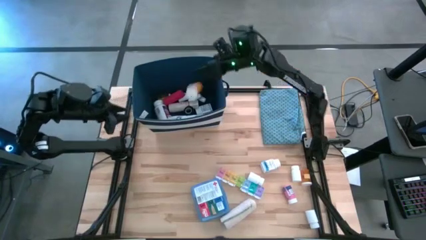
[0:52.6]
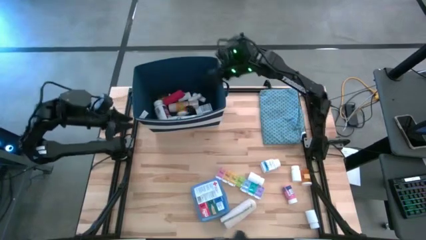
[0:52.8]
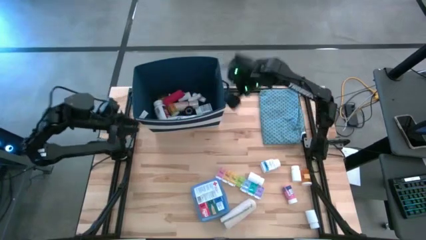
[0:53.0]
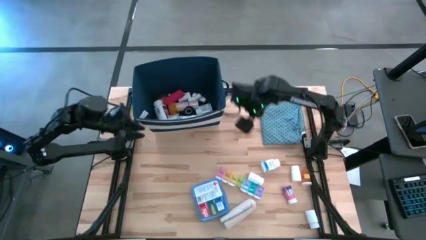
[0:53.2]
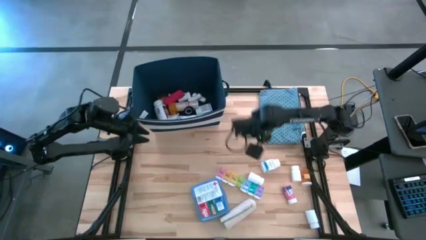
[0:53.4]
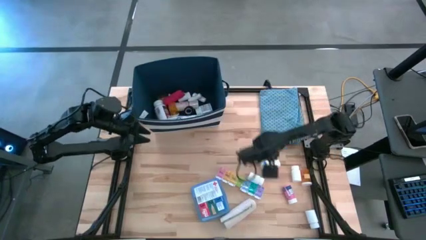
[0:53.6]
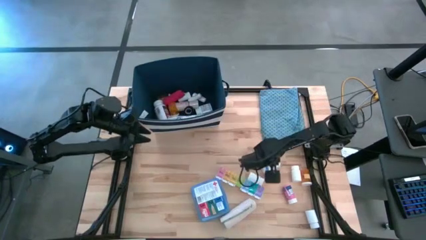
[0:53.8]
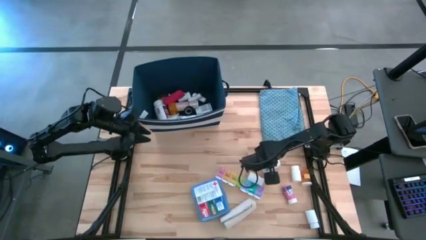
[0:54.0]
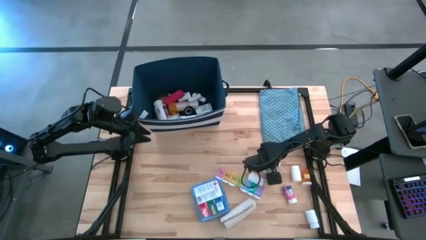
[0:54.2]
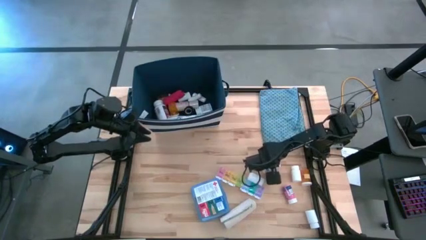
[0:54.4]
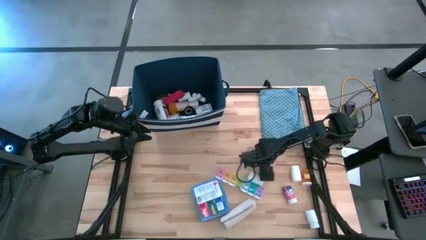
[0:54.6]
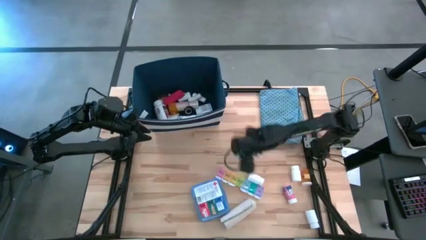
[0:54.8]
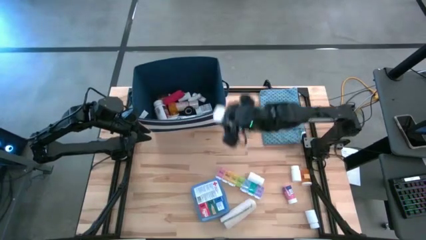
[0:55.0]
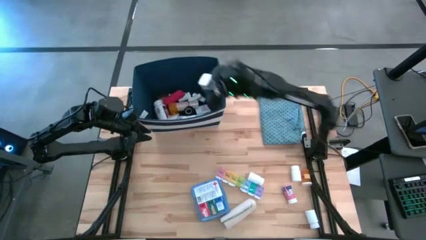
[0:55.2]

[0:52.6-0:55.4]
Task: Pick & place medical supplies in basket/bin
Put the blue supplement bottle into the blue bin

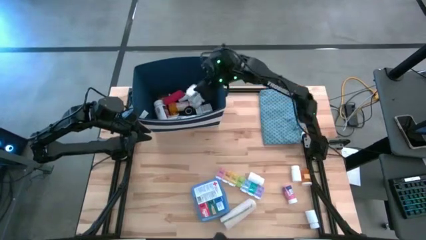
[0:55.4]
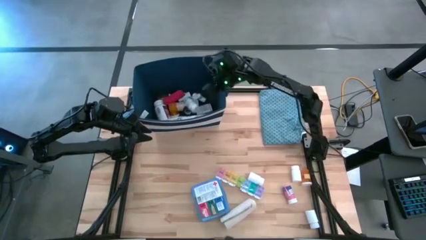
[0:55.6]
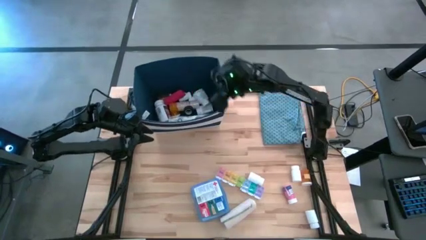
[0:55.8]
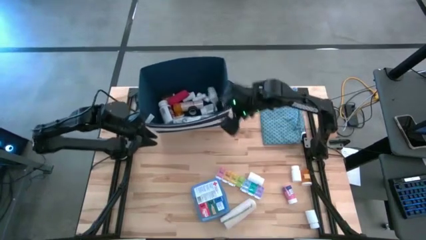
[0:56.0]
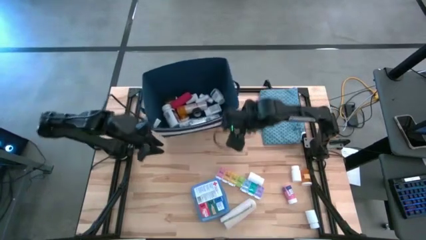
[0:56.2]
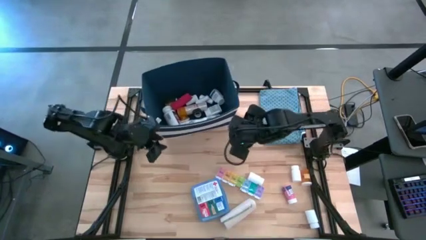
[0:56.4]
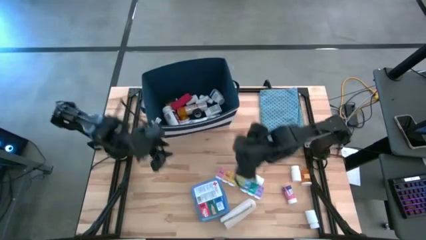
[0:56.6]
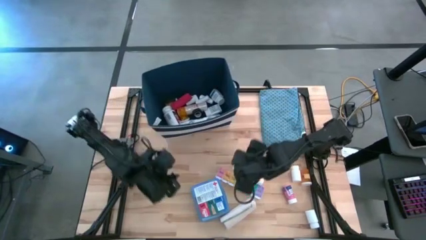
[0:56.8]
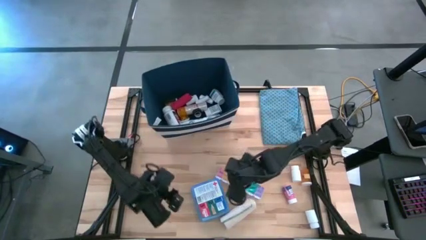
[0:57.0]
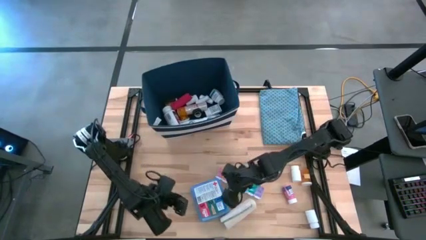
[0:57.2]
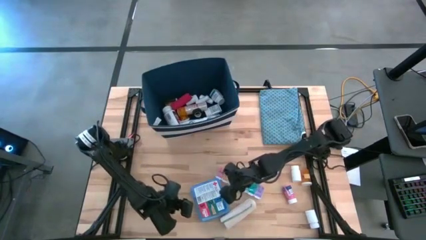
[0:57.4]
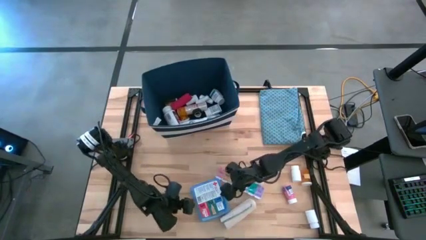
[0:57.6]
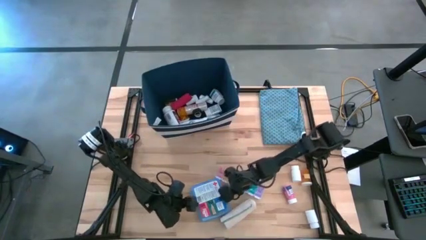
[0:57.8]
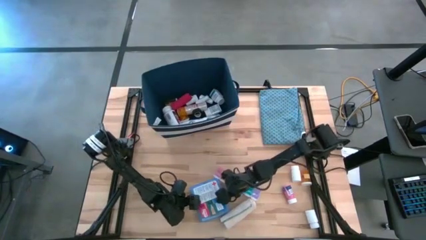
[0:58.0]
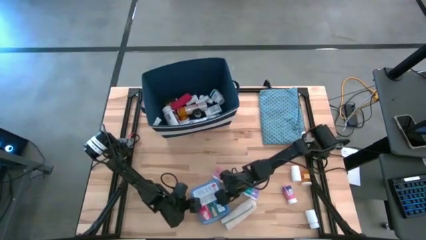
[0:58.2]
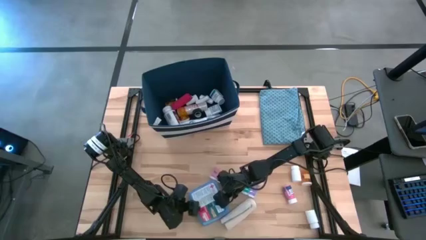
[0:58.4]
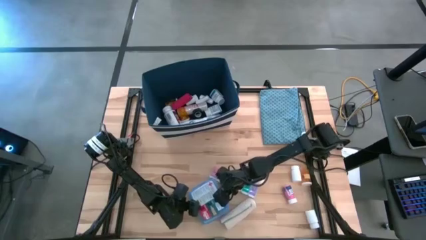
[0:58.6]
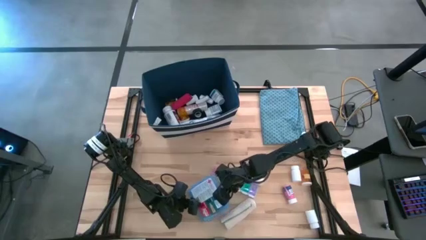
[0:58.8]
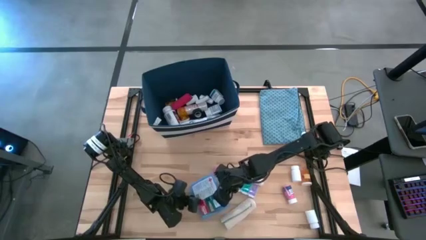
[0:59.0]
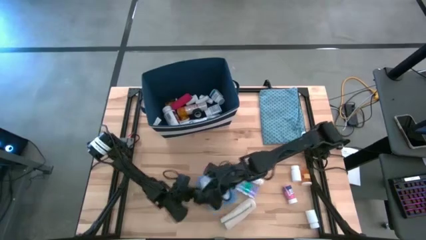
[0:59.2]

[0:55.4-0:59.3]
Put the first aid kit into the blue bin

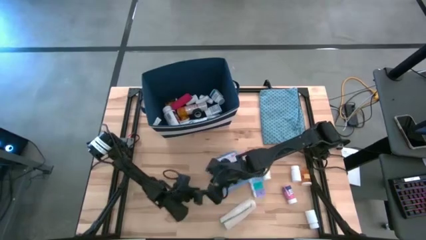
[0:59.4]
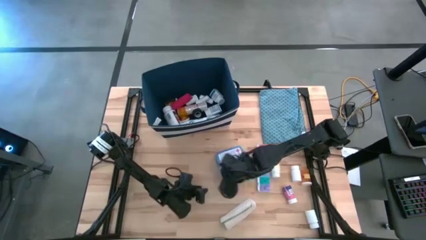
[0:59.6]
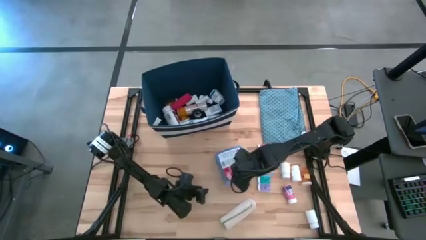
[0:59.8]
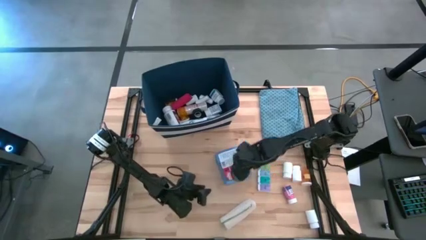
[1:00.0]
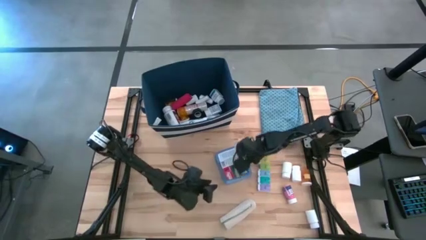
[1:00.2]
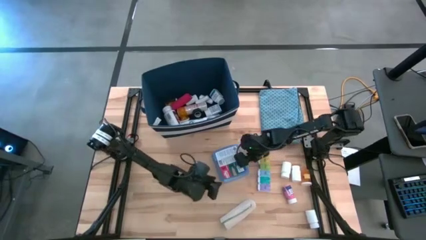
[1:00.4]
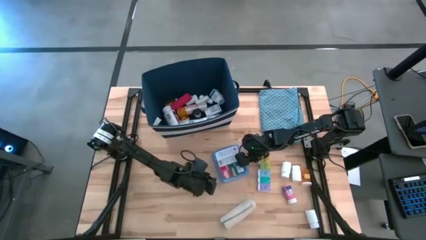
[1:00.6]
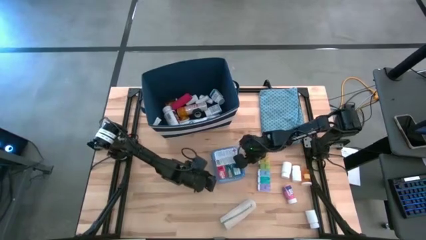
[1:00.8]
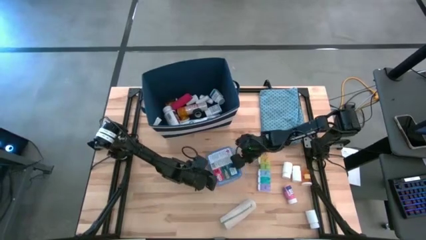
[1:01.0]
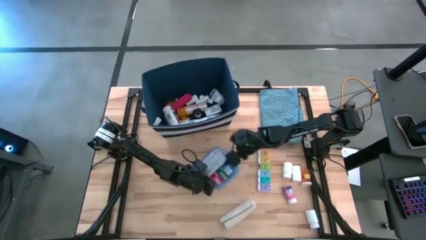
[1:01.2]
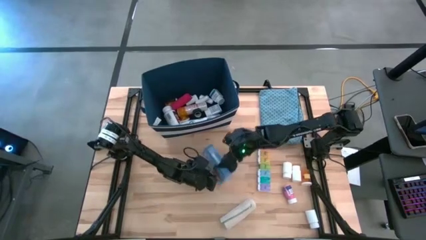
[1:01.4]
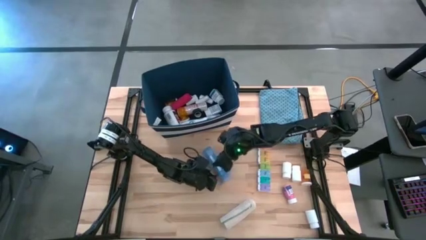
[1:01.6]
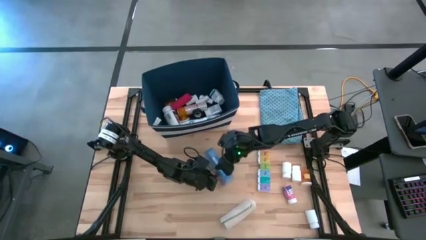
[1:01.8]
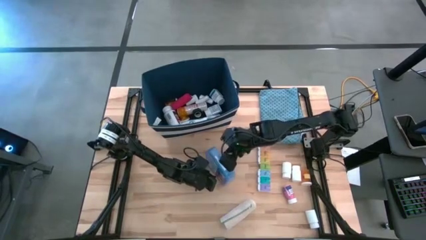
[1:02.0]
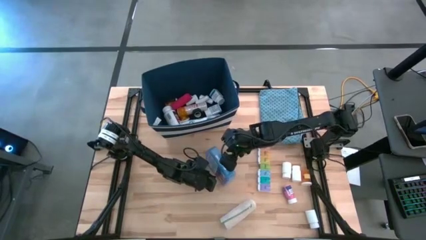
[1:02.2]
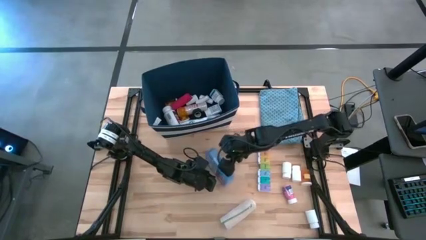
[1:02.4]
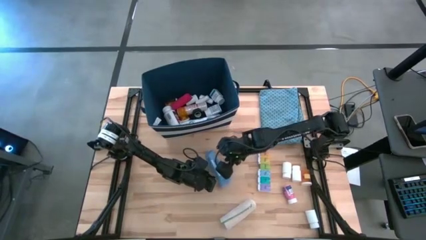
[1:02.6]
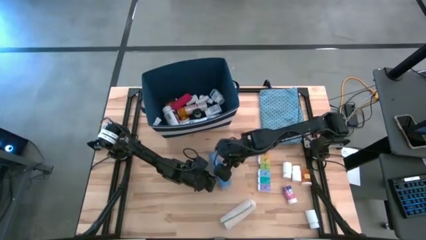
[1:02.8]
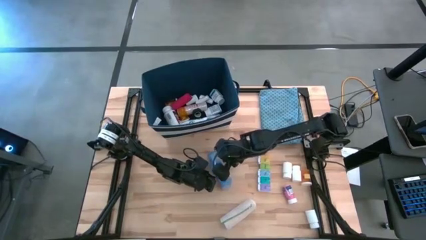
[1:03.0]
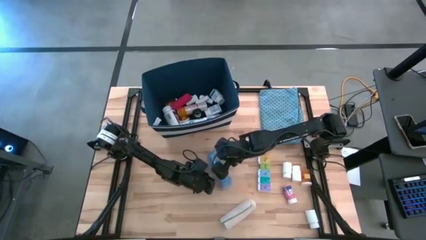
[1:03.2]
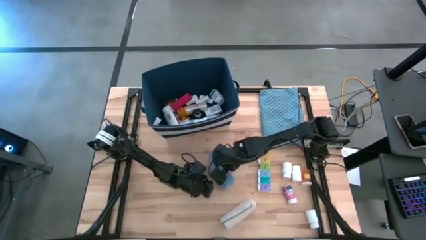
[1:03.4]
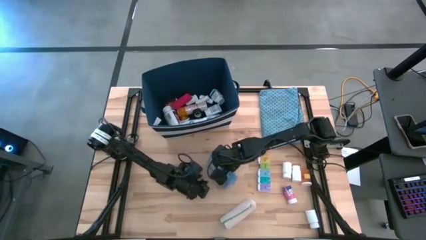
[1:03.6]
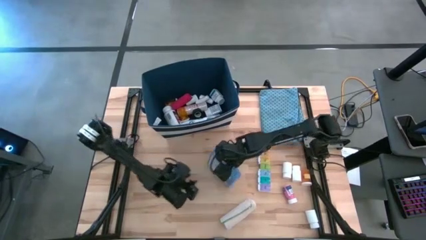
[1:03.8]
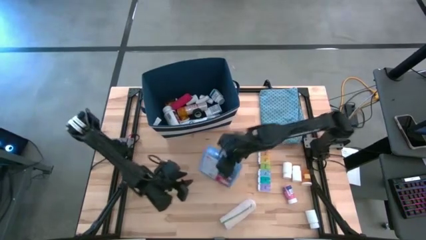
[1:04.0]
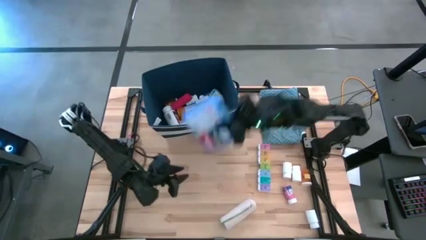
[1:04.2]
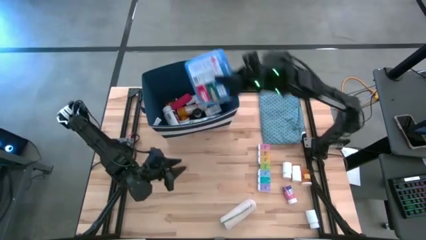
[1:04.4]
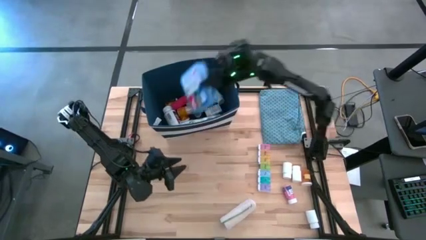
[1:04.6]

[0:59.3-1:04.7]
Put the first aid kit into the blue bin

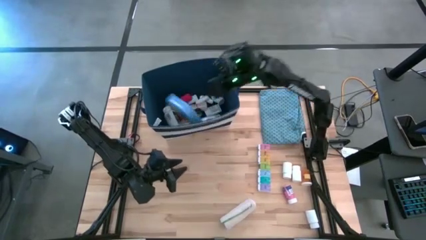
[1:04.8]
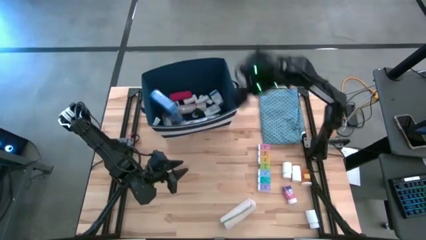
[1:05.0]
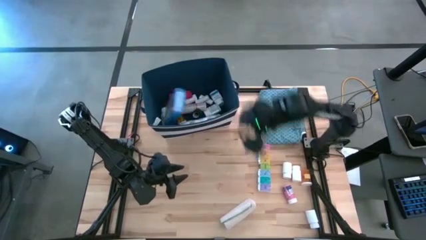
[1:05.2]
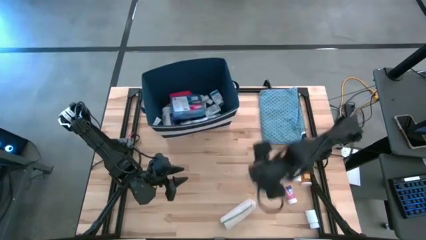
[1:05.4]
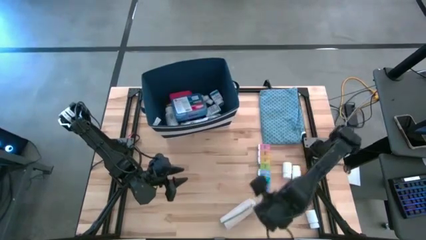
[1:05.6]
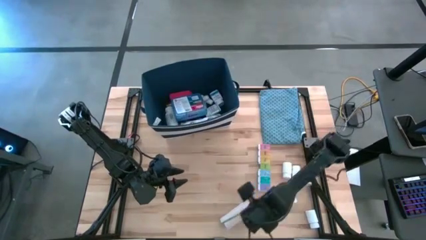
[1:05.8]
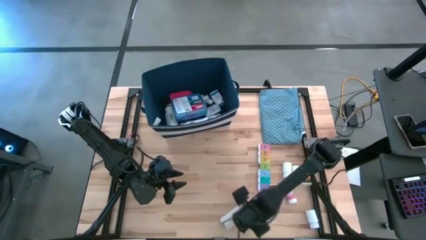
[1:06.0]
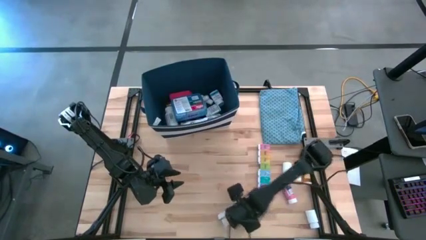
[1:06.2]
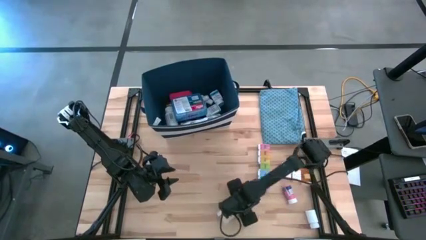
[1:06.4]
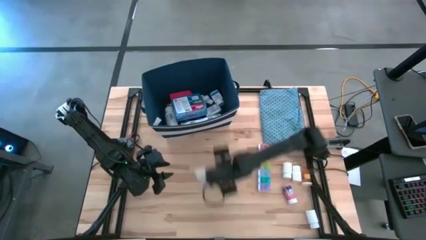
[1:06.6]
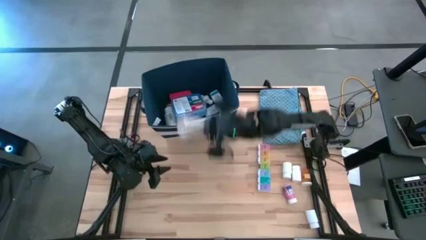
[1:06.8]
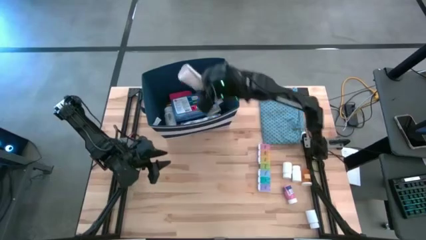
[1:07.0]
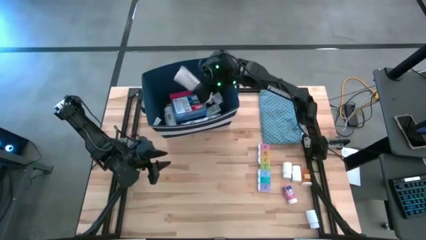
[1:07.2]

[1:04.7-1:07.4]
Put the brown bandage into the blue bin

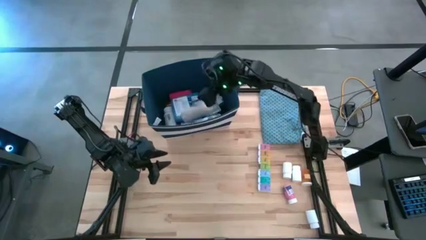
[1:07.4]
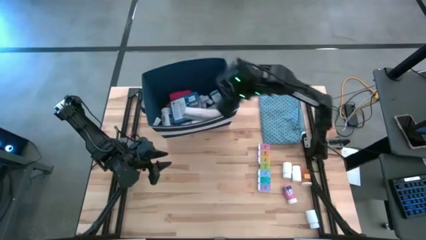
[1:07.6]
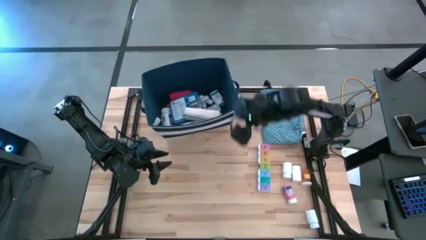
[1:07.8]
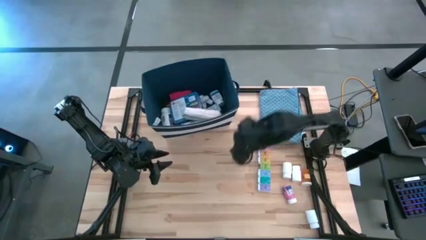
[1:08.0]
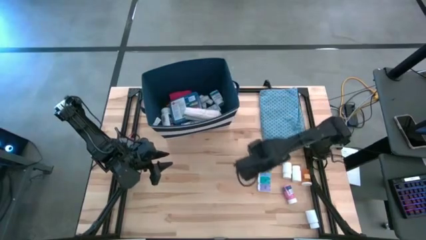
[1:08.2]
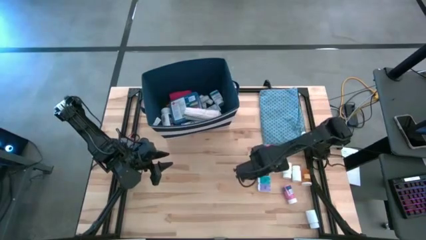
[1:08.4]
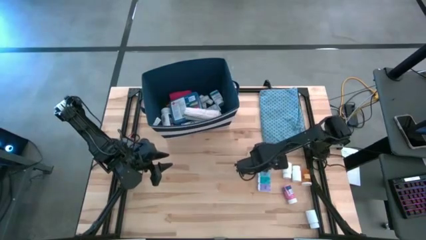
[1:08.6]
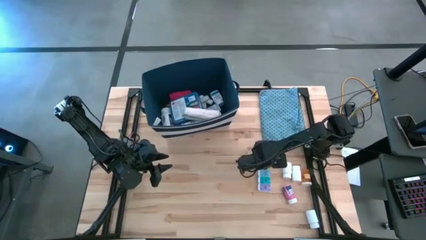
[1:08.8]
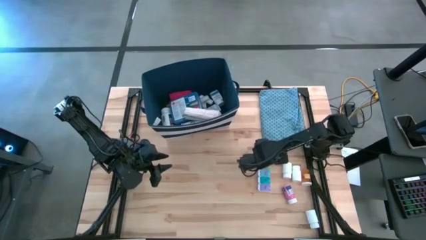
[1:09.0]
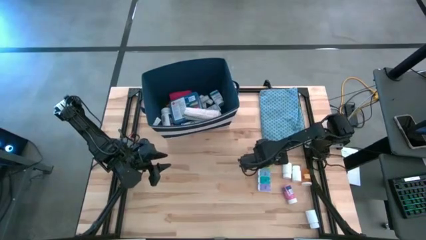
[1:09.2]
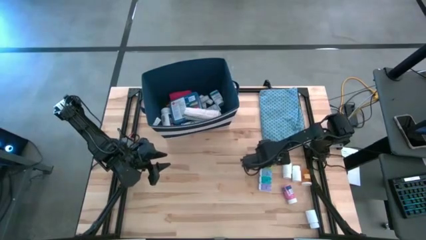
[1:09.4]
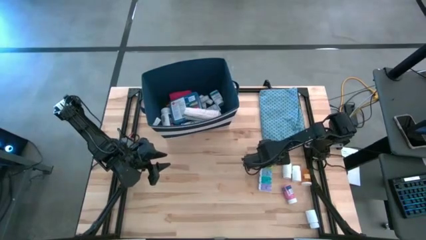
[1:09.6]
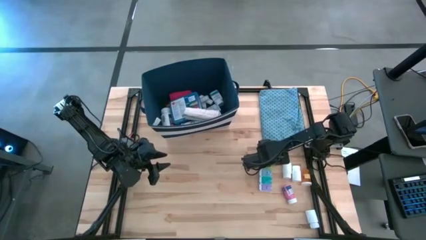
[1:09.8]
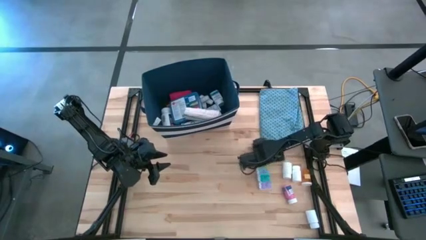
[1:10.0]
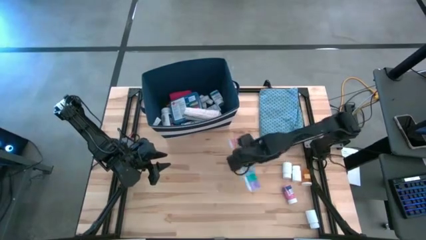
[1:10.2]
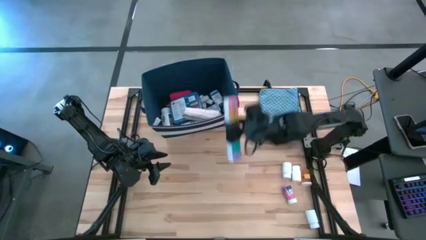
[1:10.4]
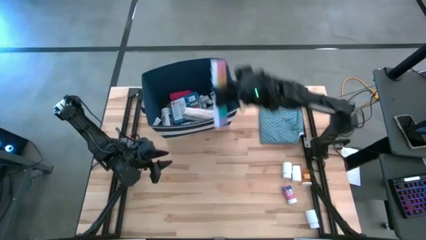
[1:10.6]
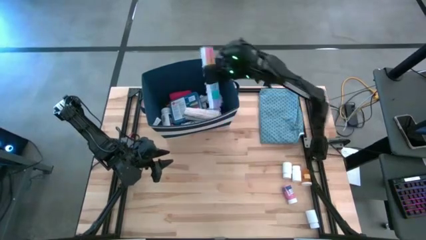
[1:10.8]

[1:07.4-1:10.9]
Put the pill organizer into the blue bin
